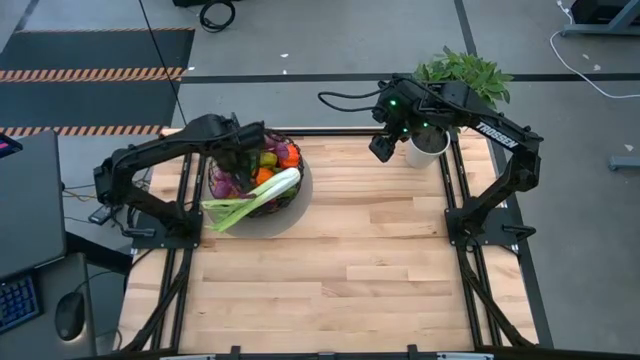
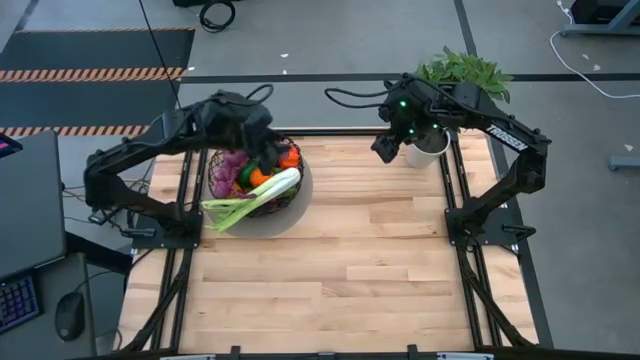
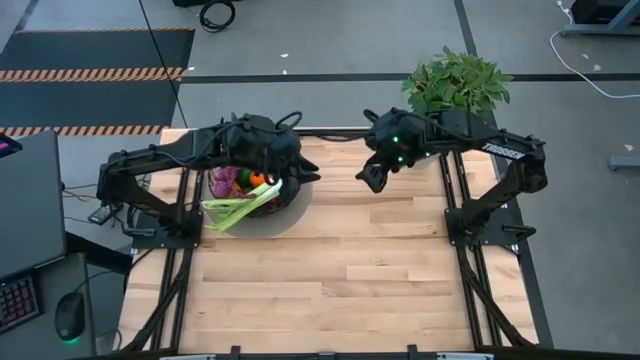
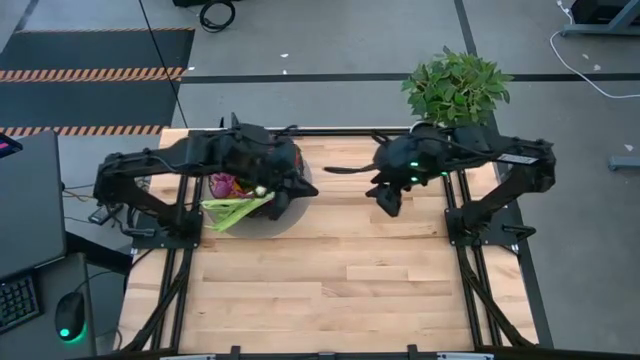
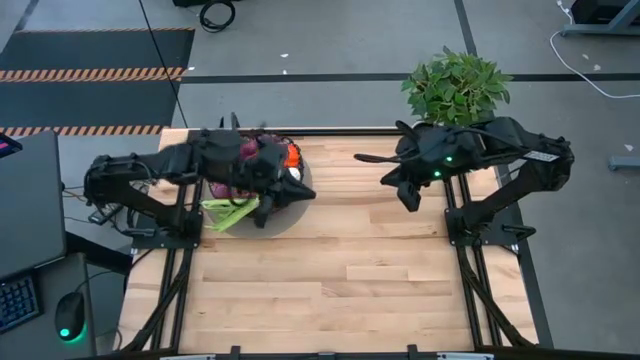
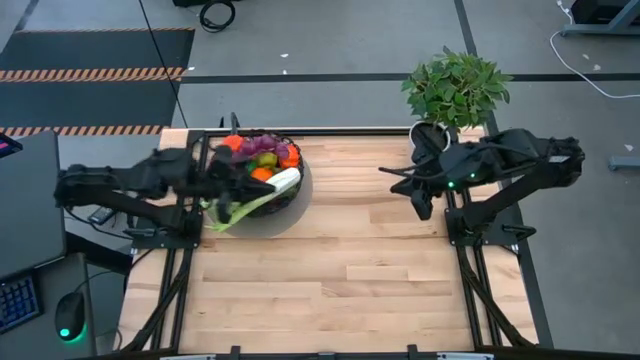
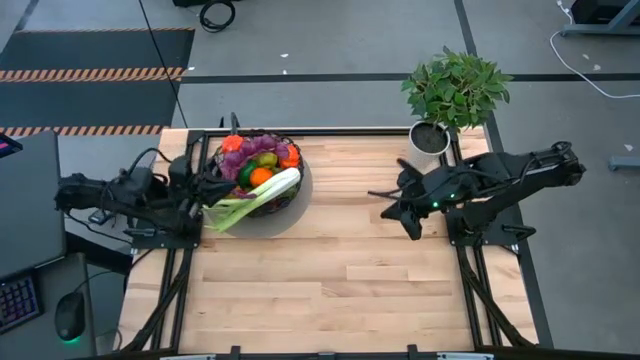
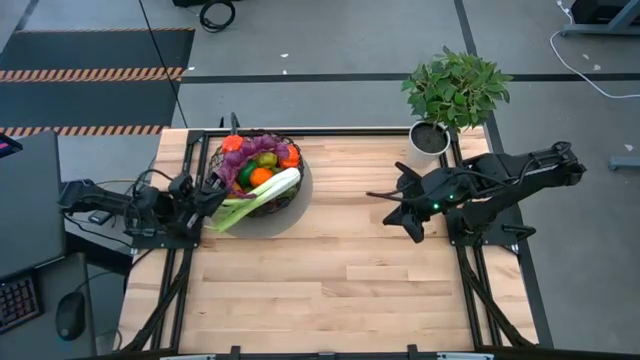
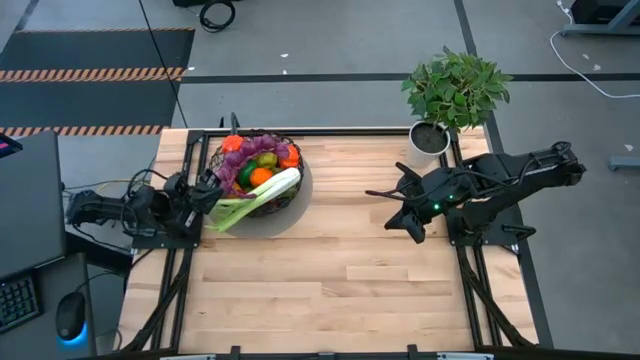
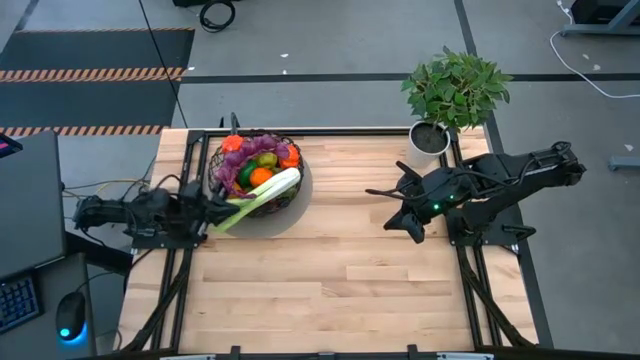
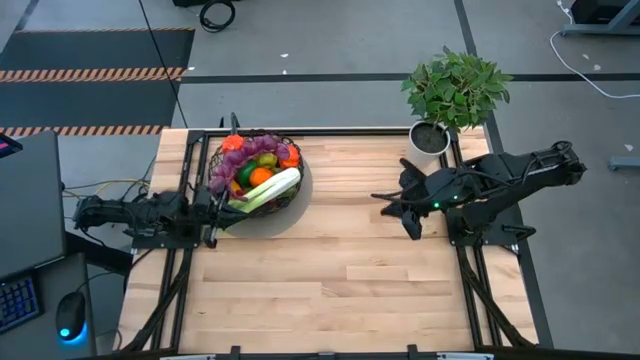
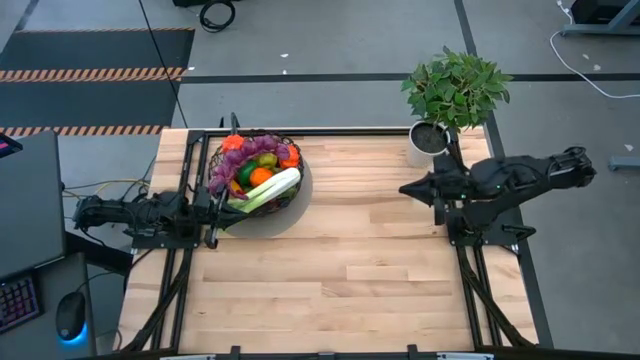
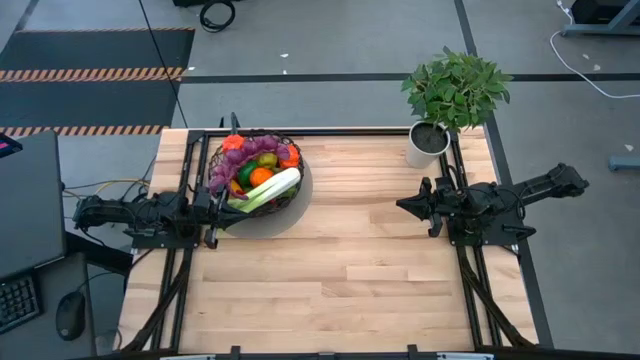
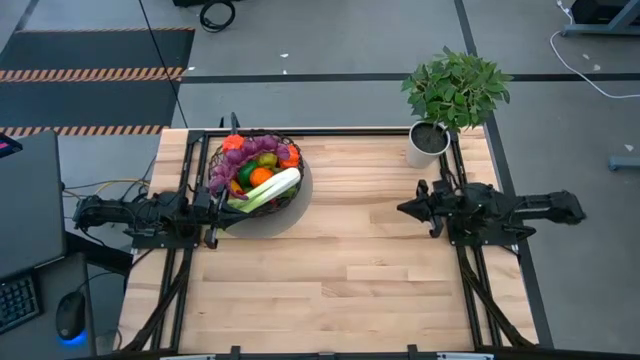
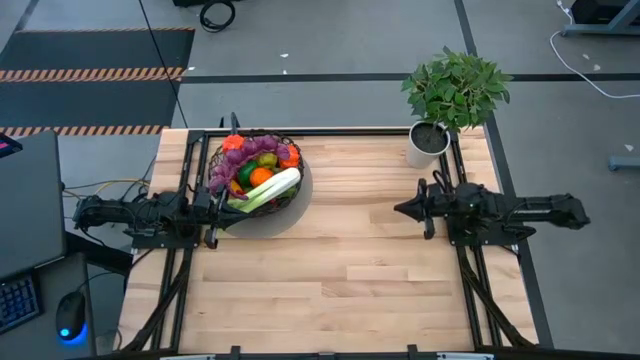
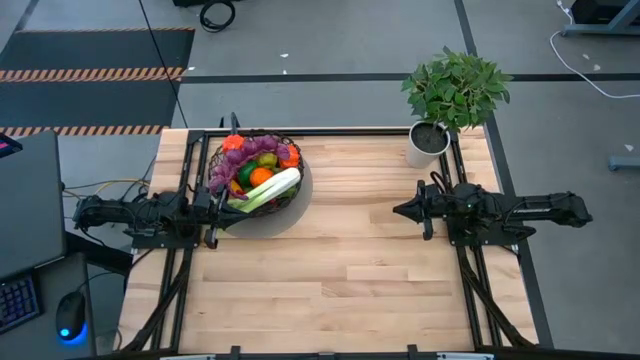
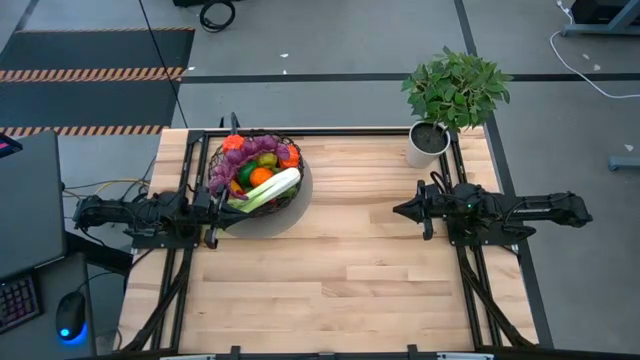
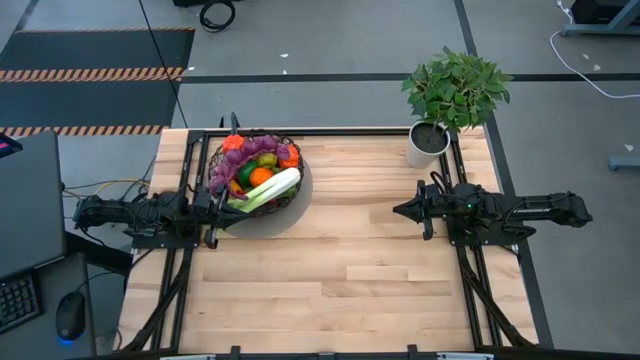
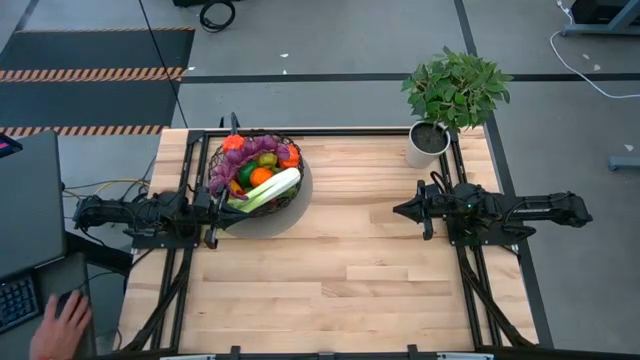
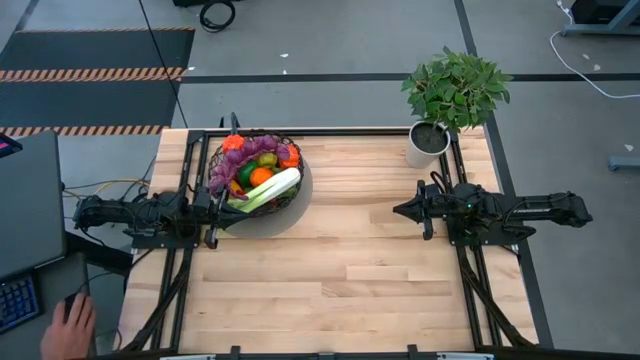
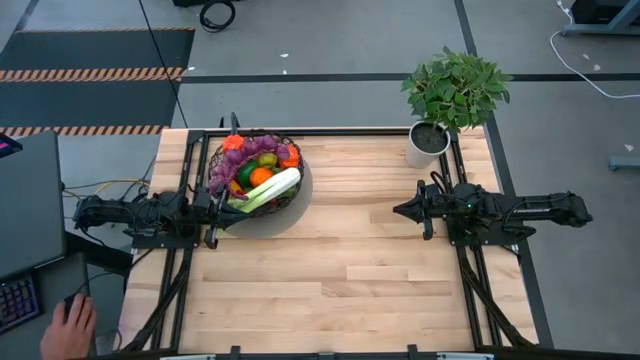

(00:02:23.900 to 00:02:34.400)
Task: Build produce basket
Return to Home Position

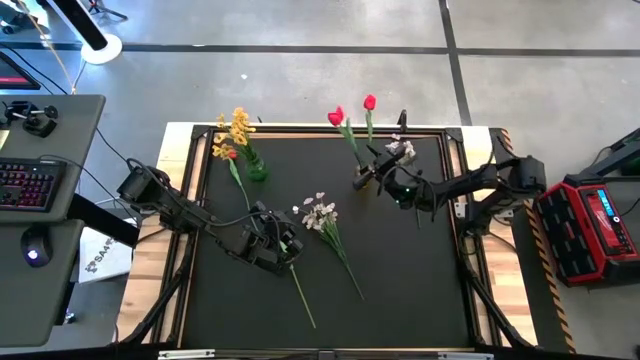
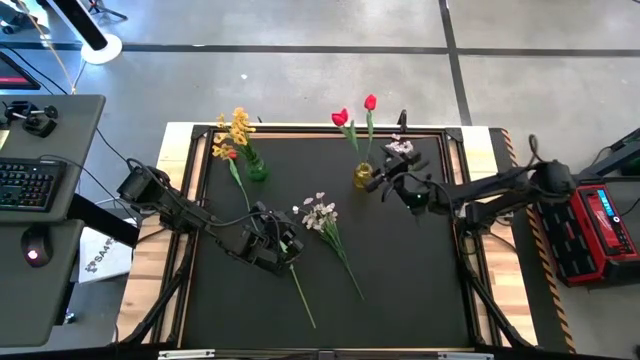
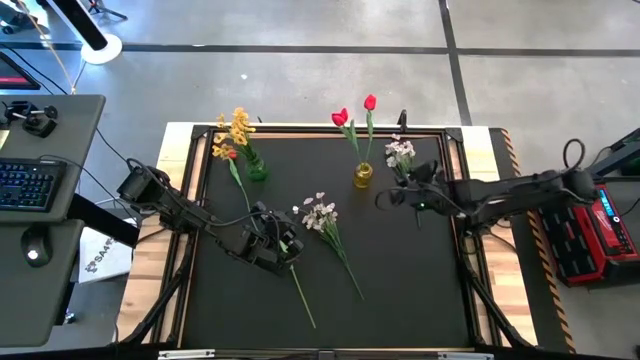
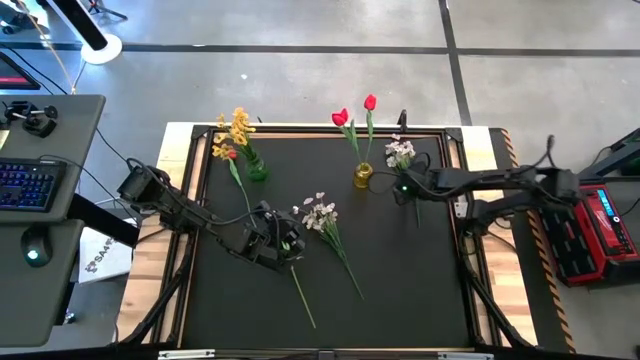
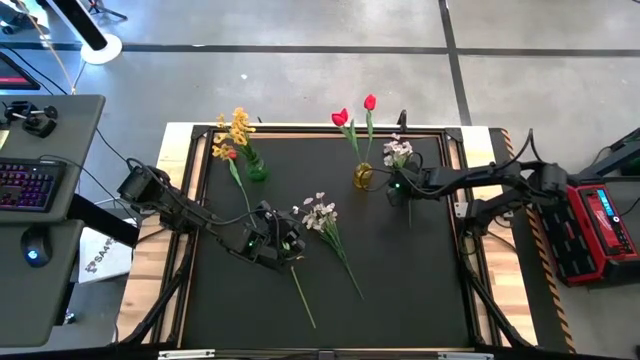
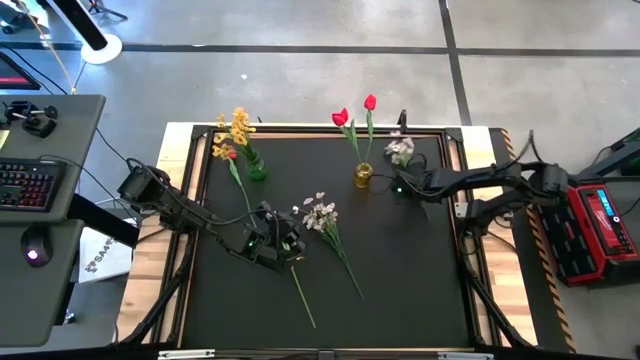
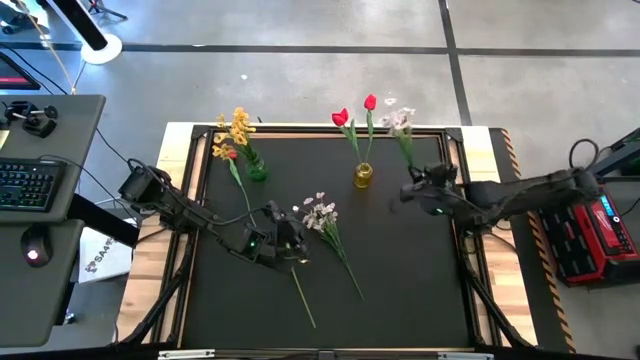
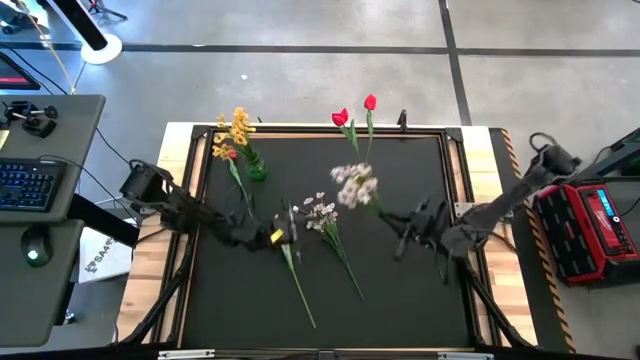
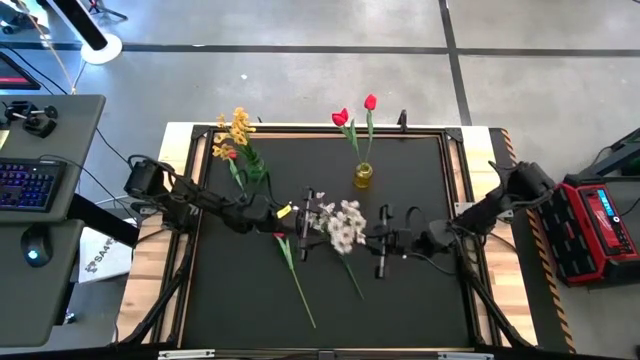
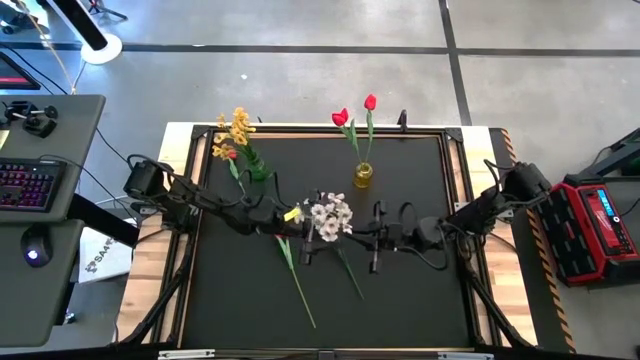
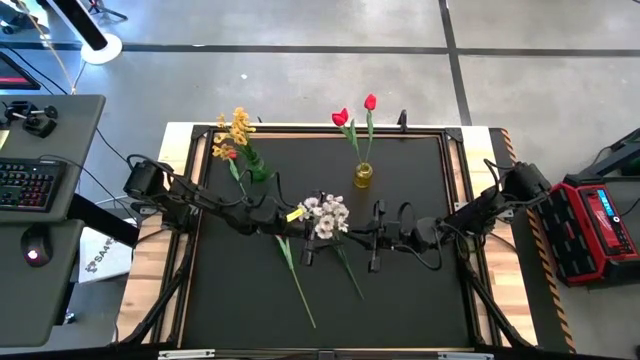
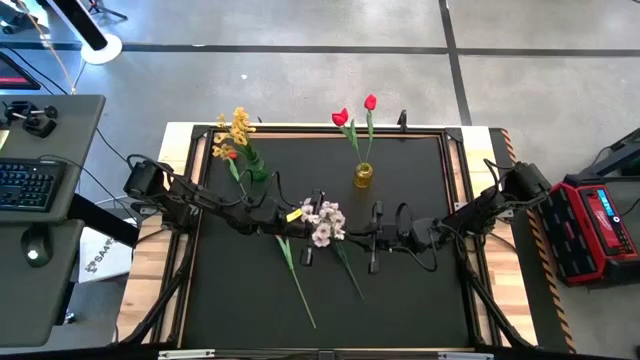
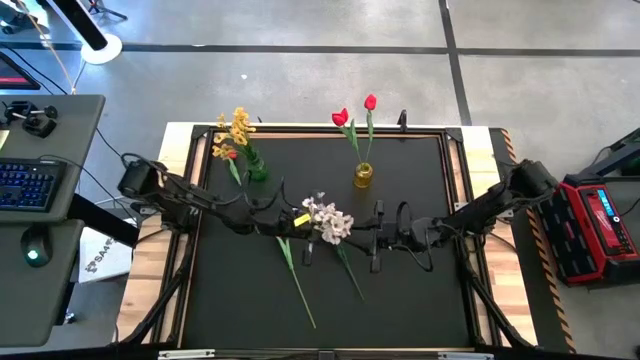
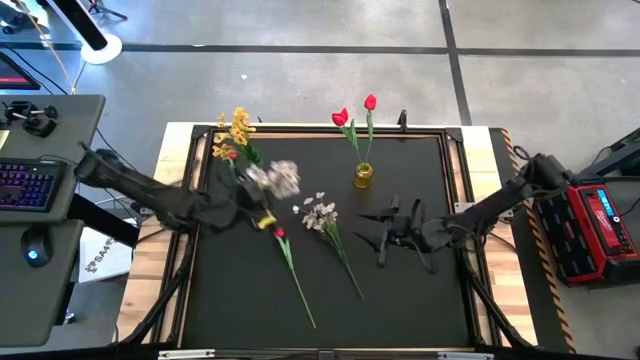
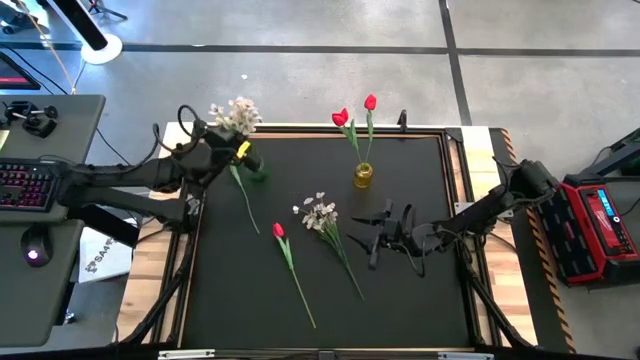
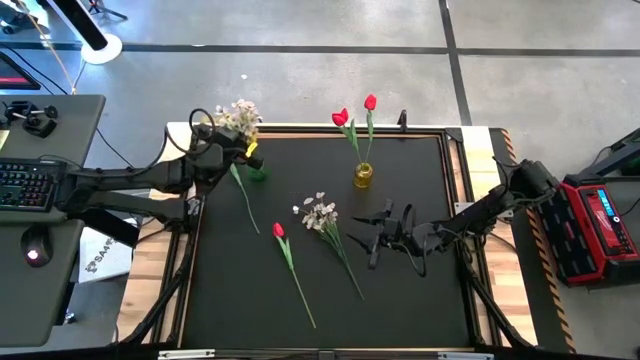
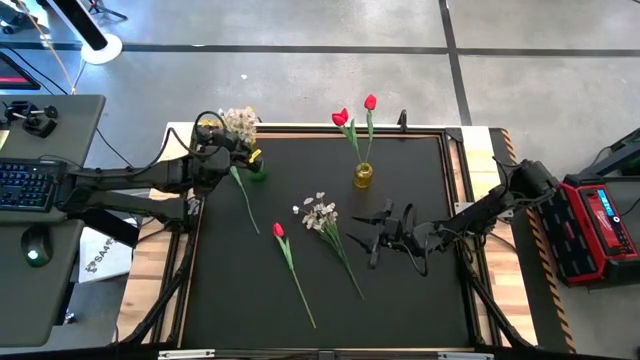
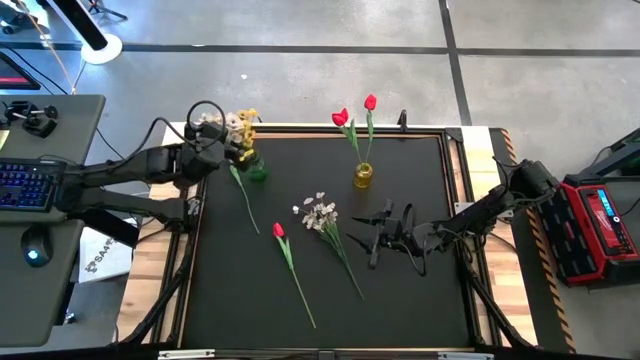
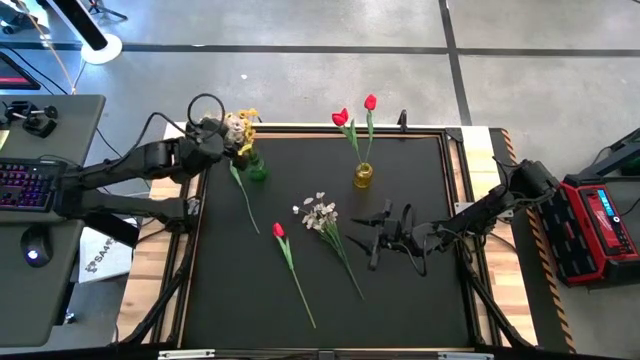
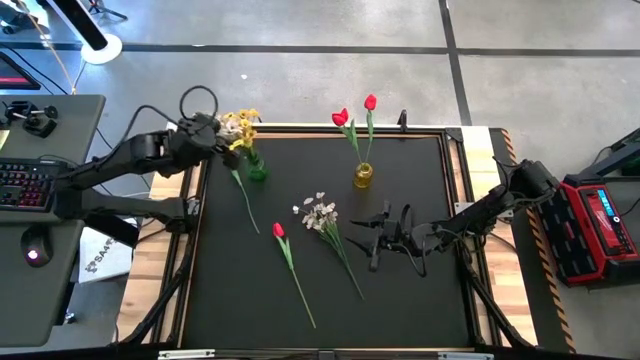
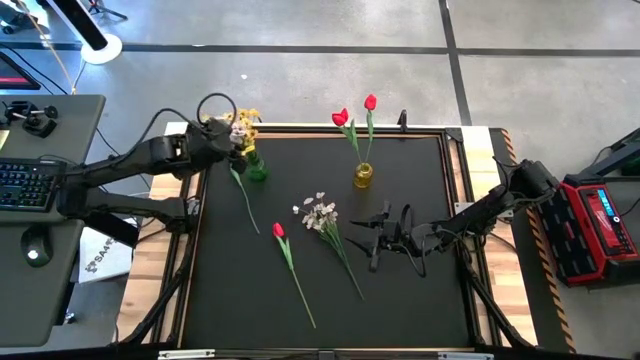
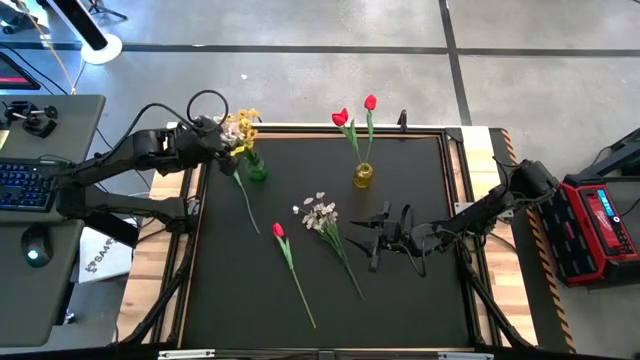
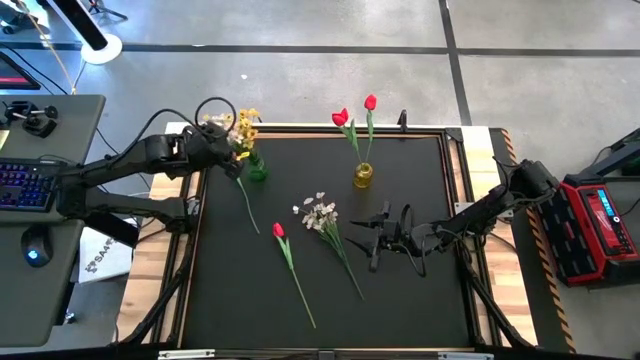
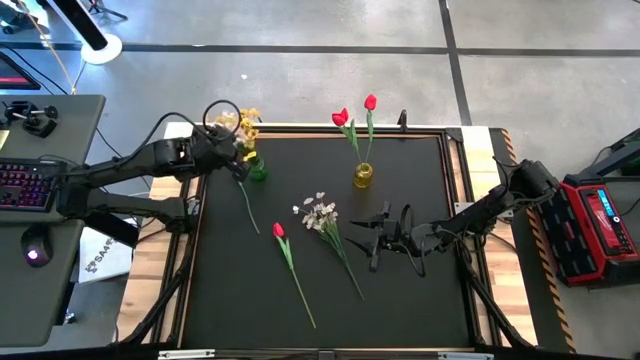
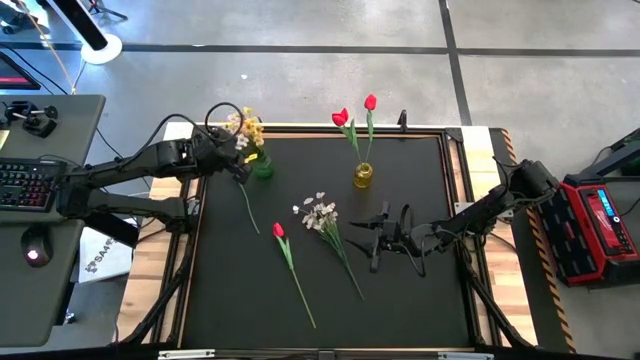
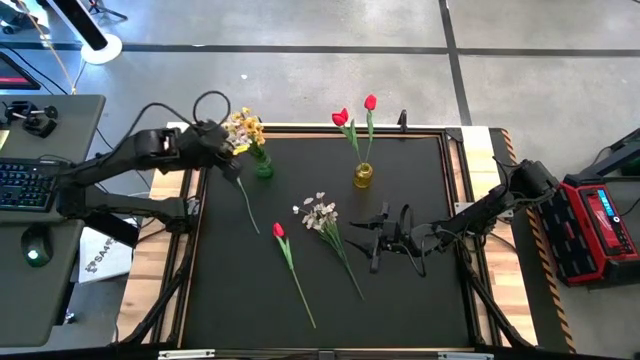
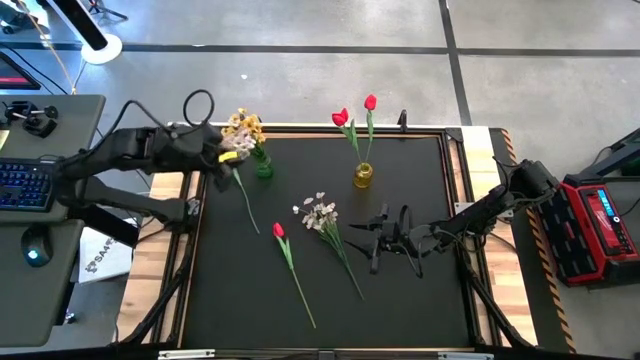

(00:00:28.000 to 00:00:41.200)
Task: Sort flowers into vase by color
Put the right white flowers into the green vase
